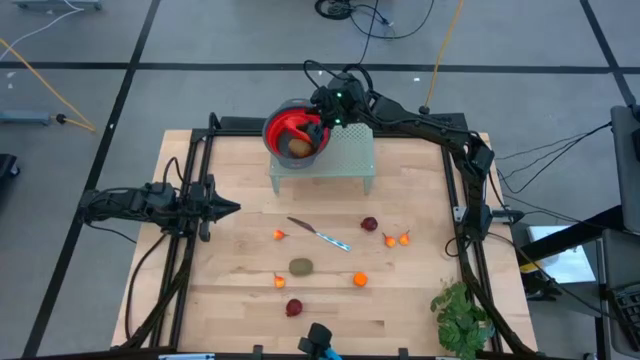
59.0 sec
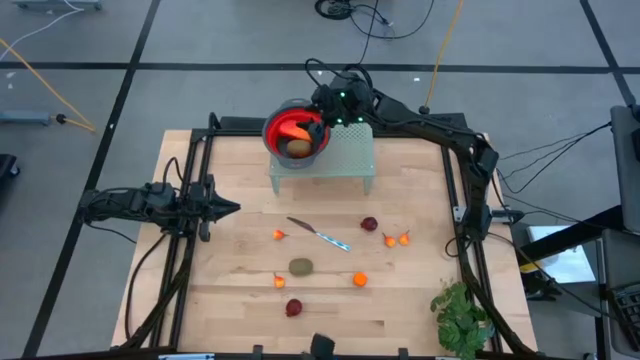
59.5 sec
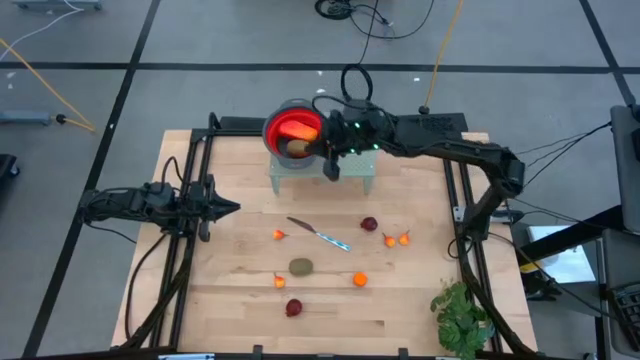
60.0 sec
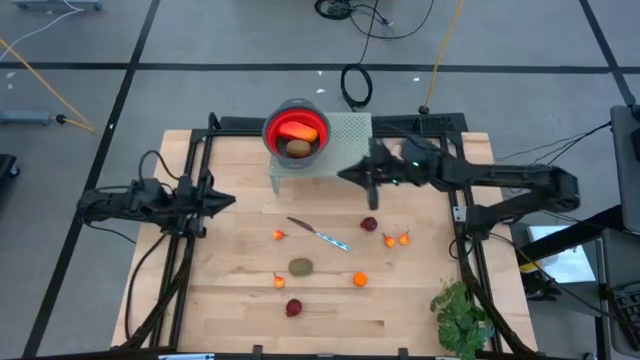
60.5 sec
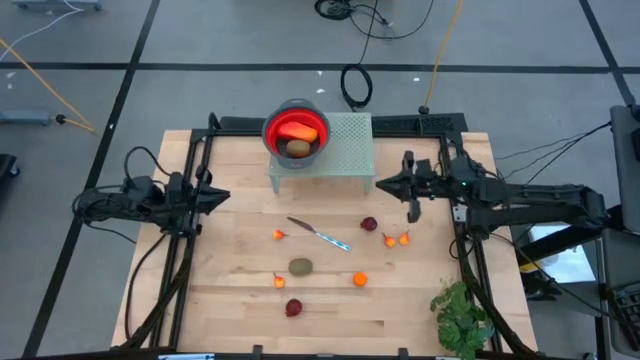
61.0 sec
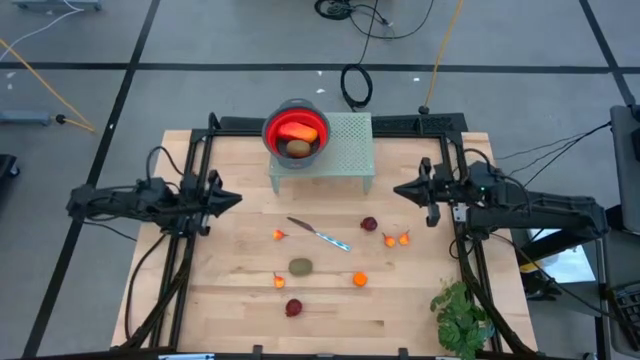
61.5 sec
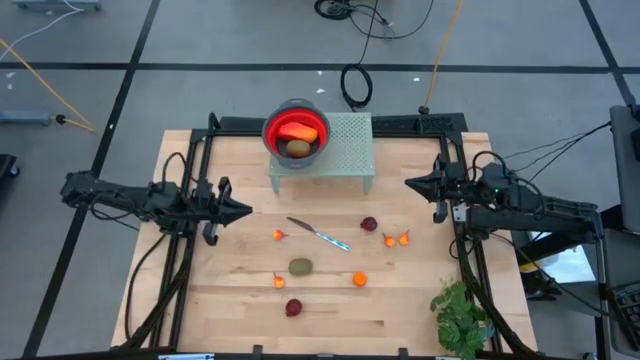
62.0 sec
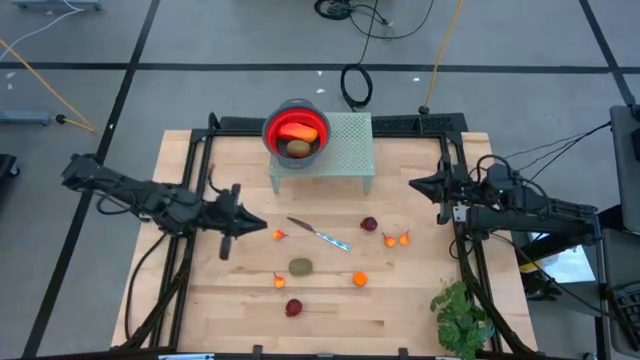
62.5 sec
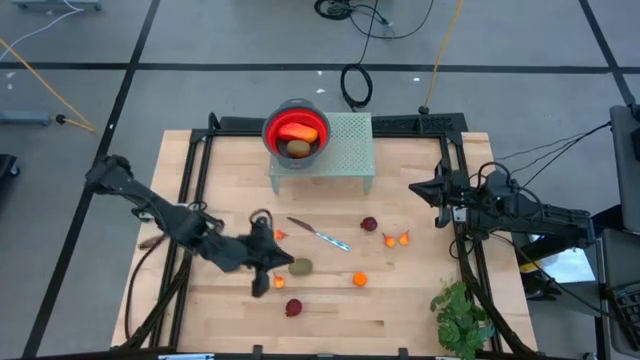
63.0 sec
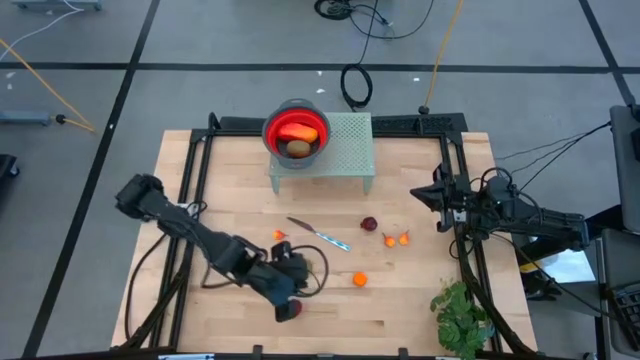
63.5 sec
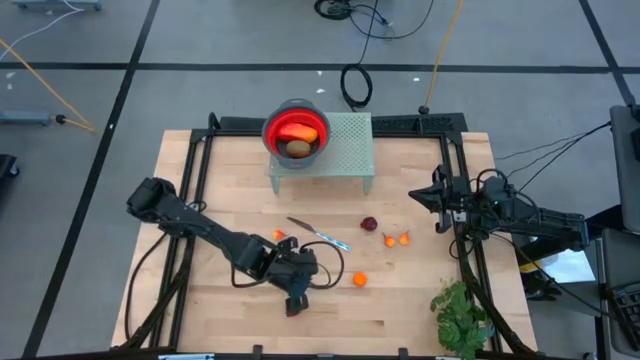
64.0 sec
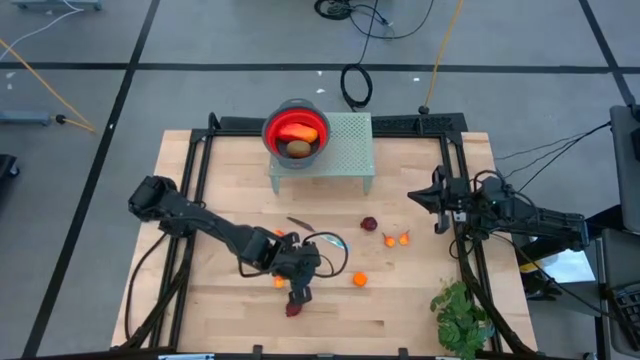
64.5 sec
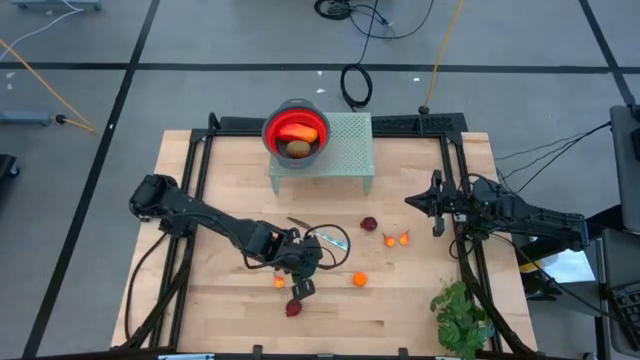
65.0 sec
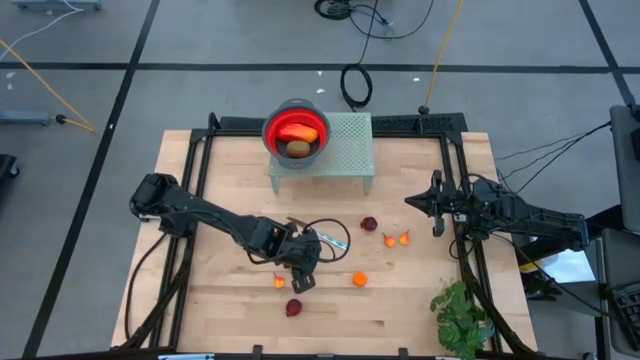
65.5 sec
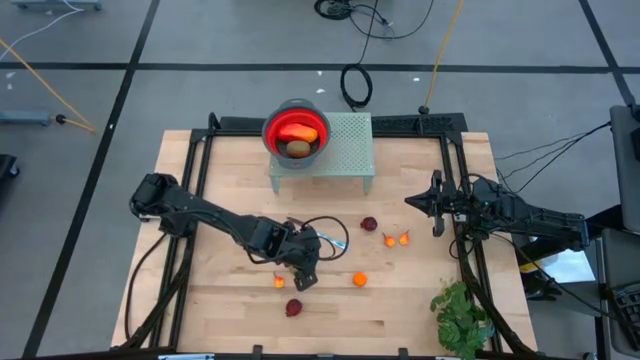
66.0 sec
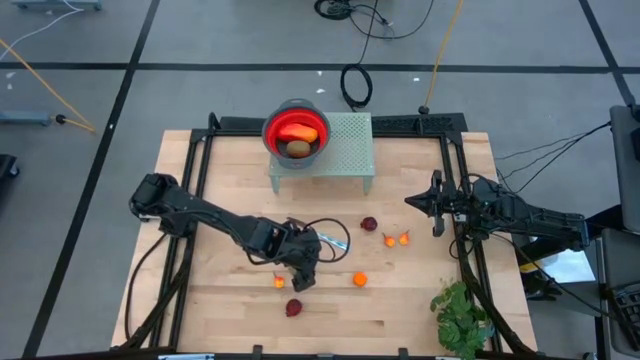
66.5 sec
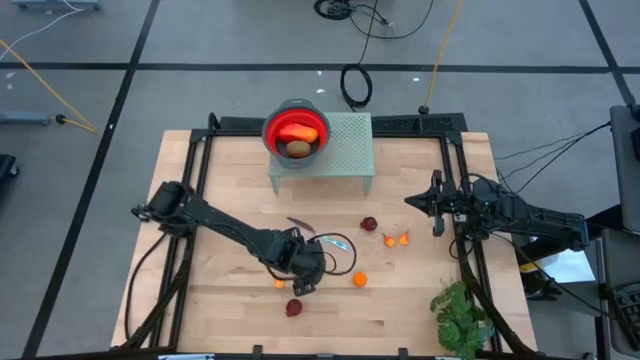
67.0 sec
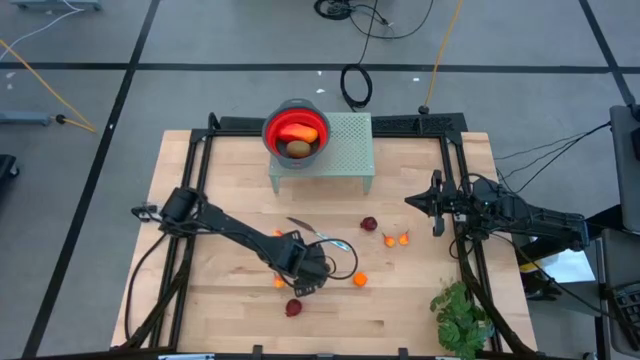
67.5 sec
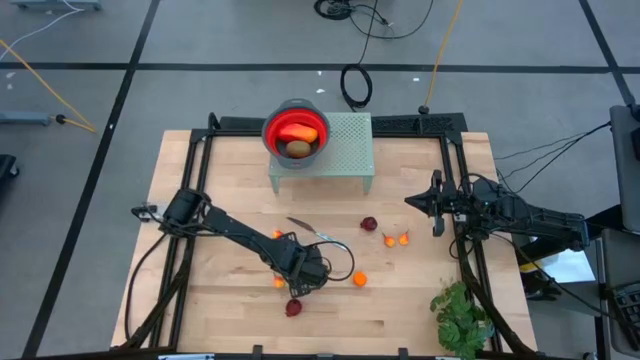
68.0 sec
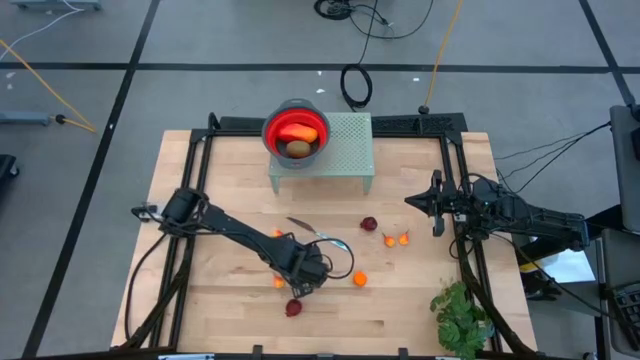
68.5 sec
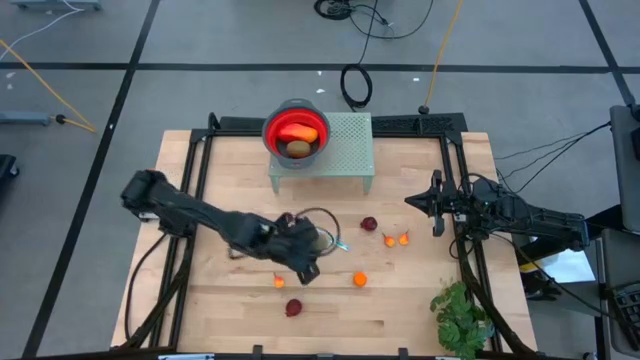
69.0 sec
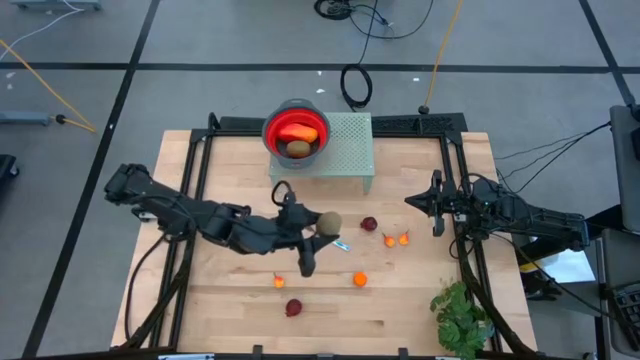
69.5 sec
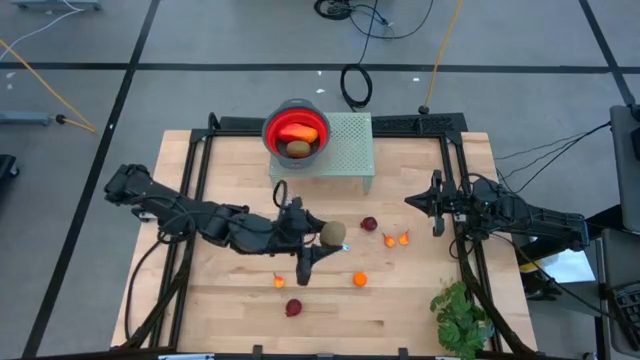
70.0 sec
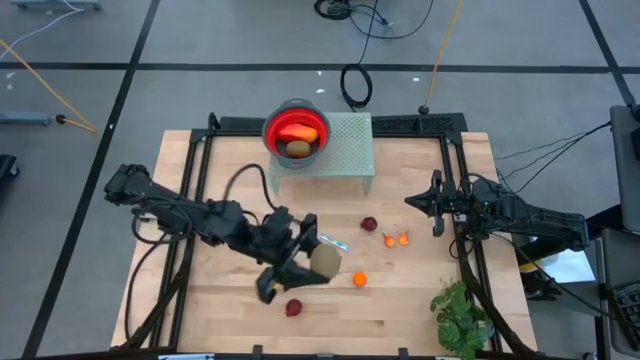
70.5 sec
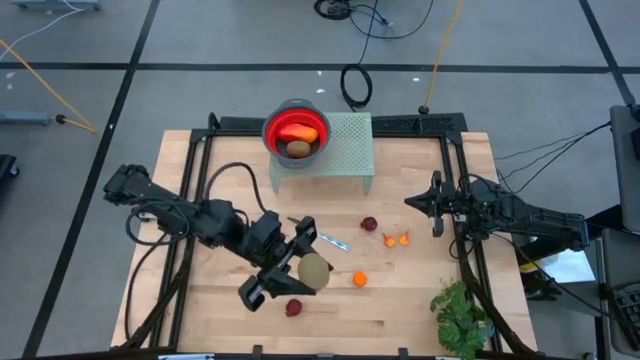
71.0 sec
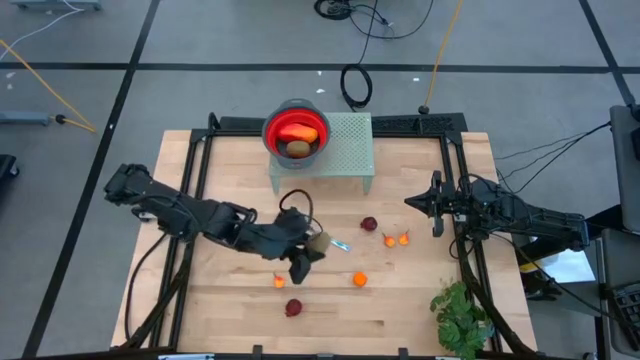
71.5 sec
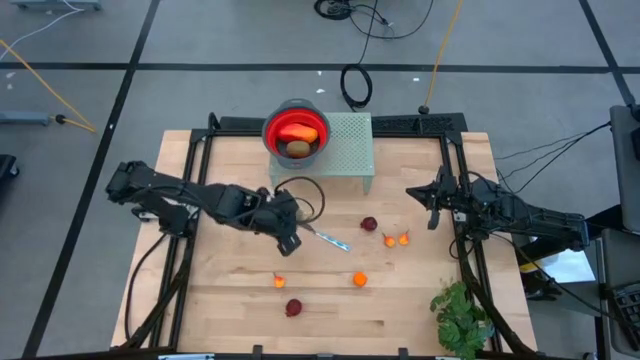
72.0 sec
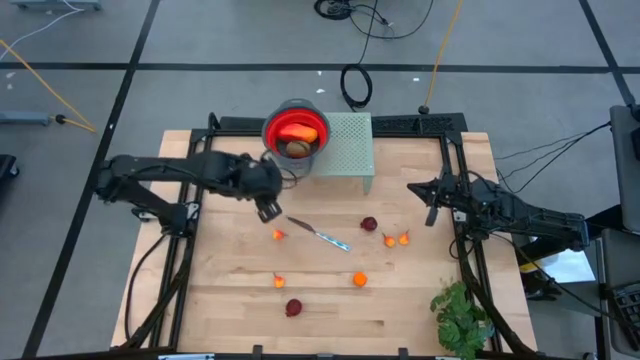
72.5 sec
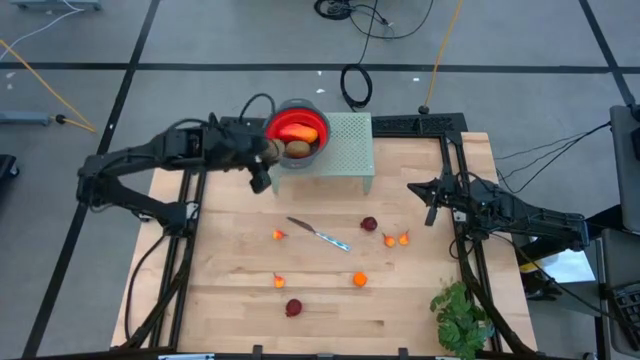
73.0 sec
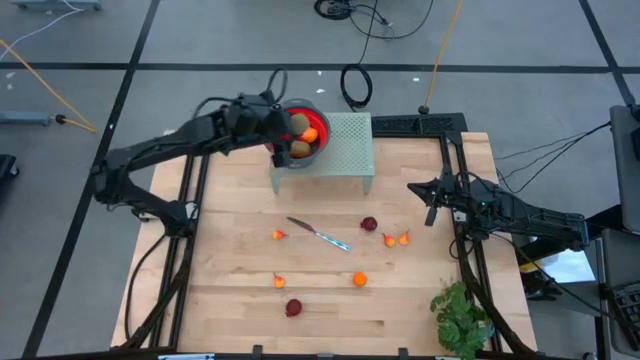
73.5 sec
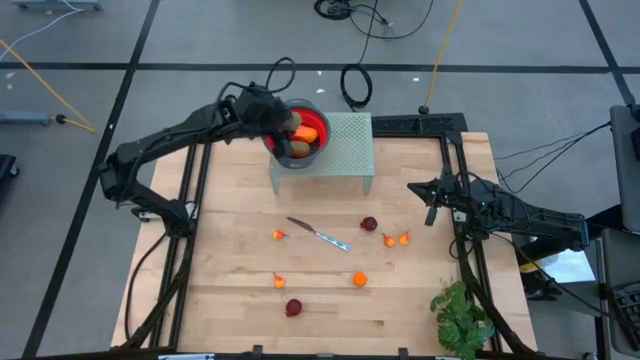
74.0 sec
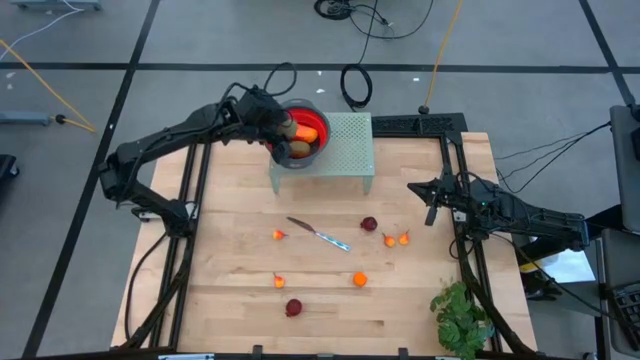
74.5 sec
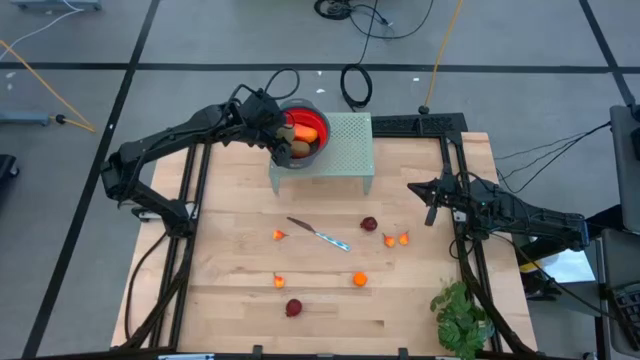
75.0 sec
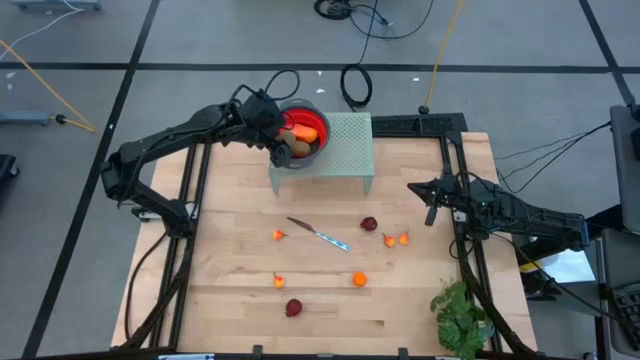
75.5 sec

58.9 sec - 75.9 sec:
Task: Pick & Place Fruit
Put the kiwi into the red strainer bowl

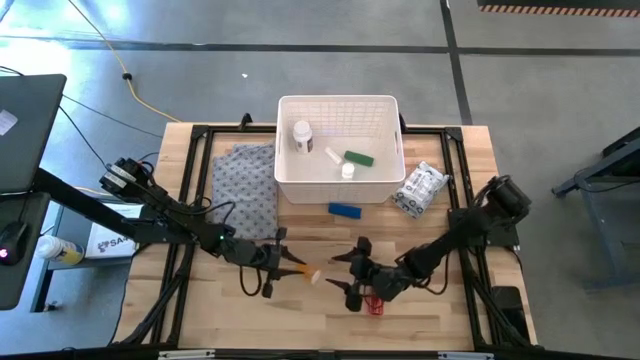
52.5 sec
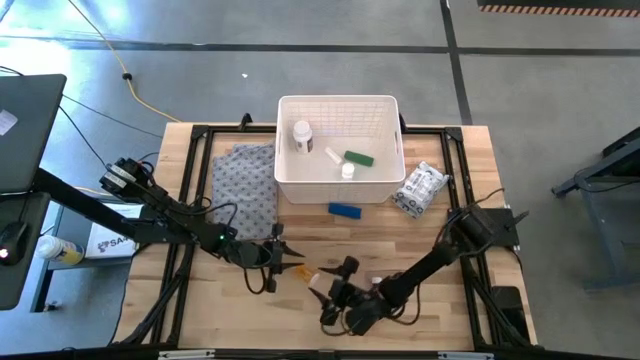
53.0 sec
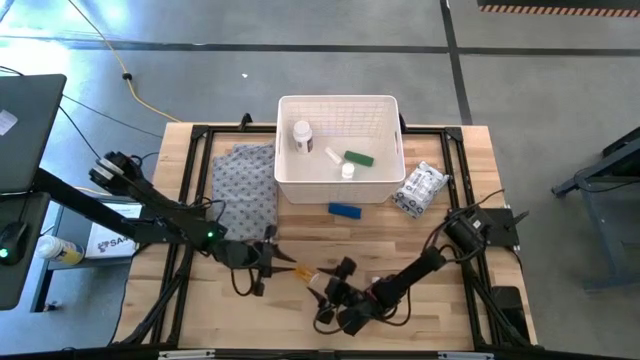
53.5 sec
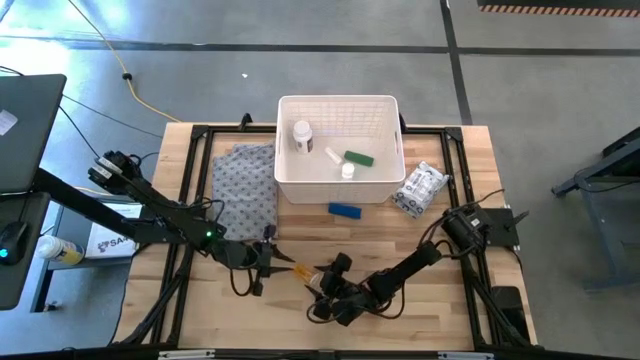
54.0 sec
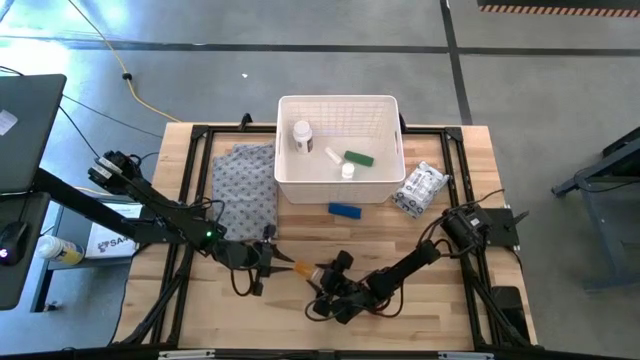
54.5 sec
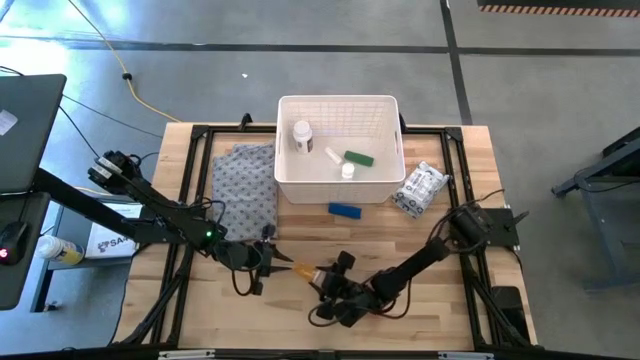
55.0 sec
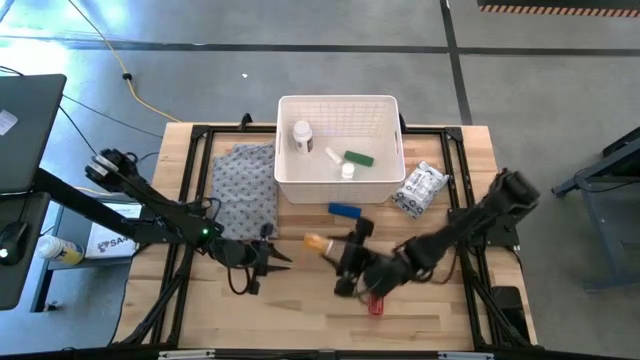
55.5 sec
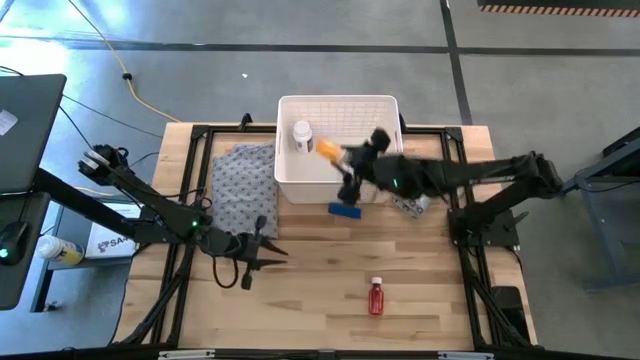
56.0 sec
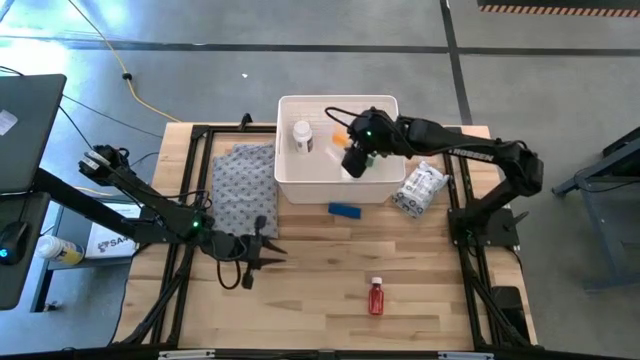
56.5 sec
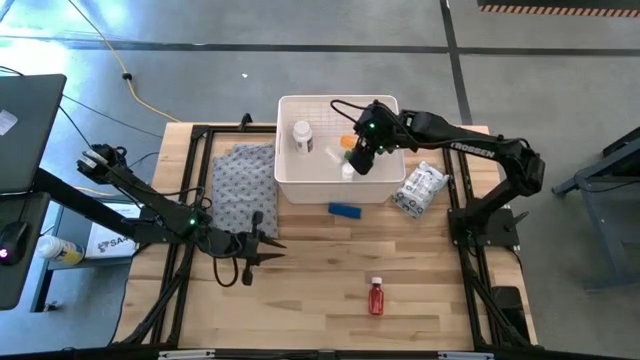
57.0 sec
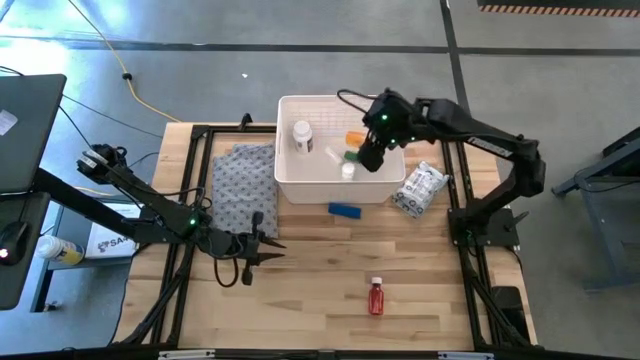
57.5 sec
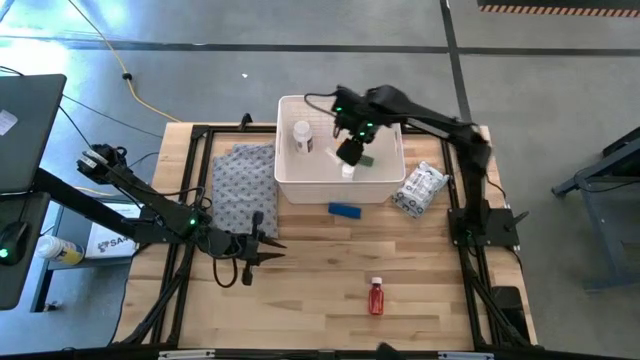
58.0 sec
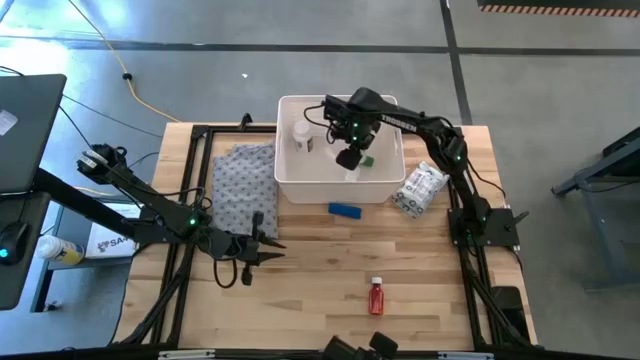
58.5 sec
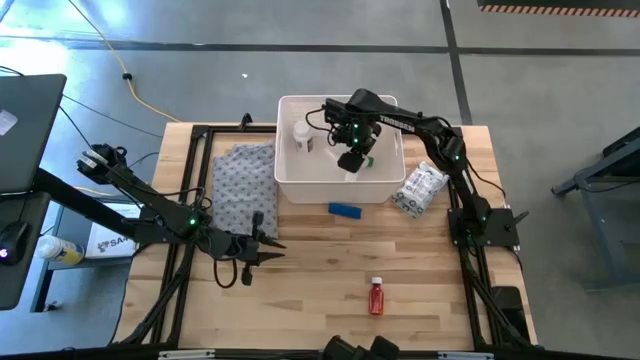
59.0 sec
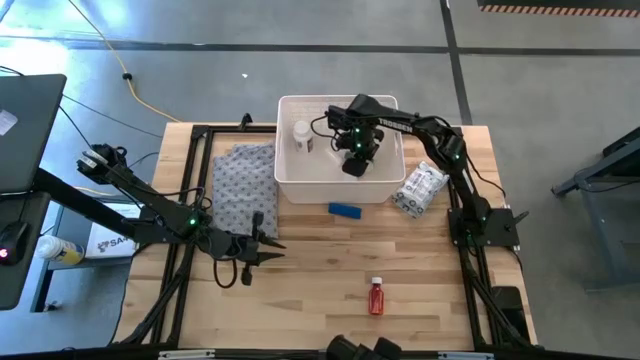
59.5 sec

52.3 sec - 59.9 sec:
Task: Pick & place medical supplies in basket/bin
Put the light orange pill bottle into the white bin
